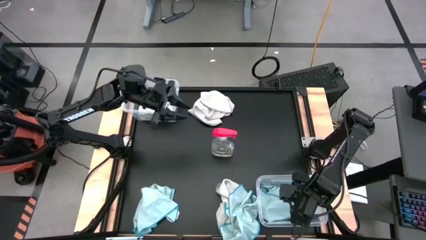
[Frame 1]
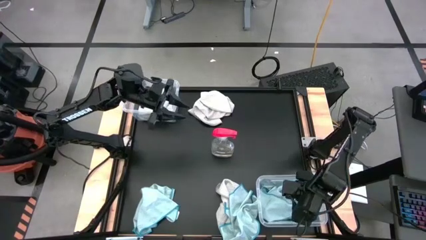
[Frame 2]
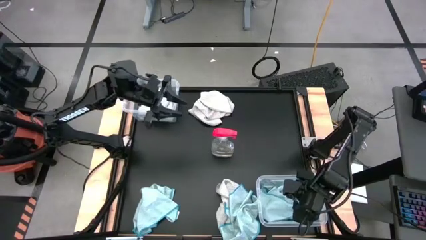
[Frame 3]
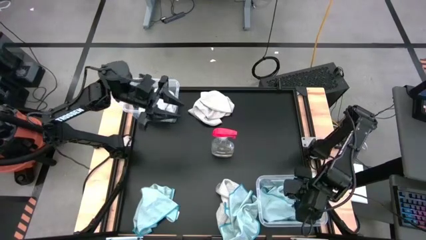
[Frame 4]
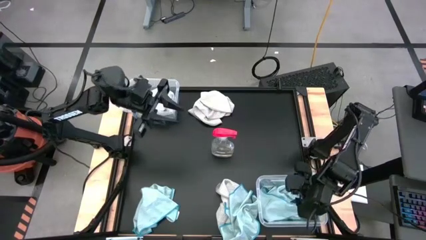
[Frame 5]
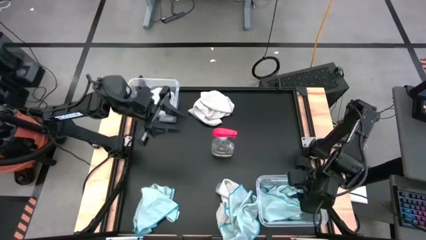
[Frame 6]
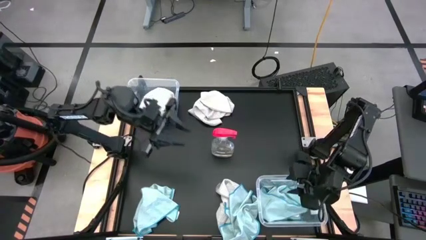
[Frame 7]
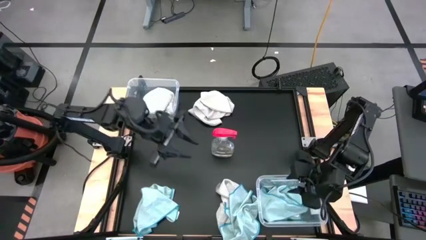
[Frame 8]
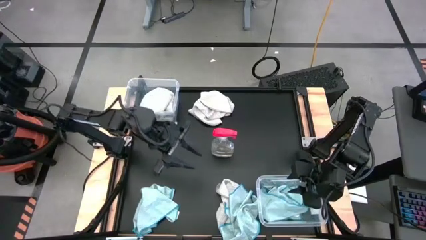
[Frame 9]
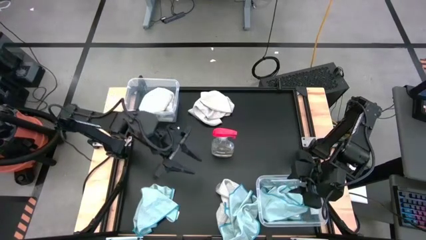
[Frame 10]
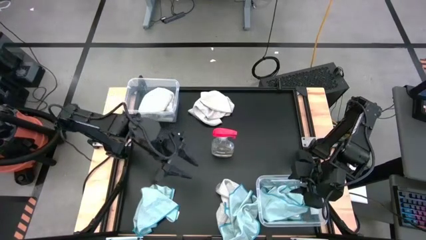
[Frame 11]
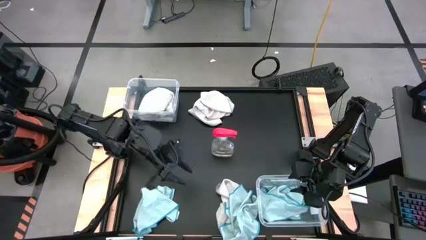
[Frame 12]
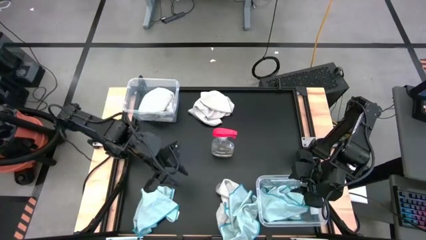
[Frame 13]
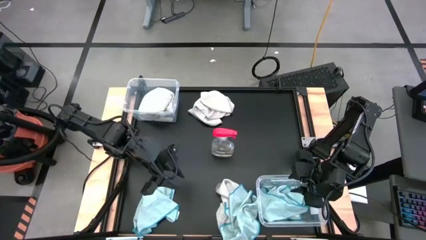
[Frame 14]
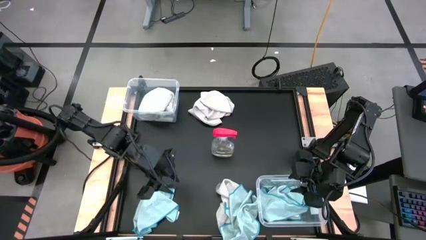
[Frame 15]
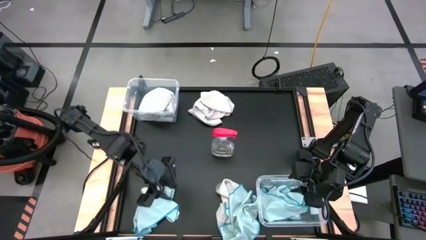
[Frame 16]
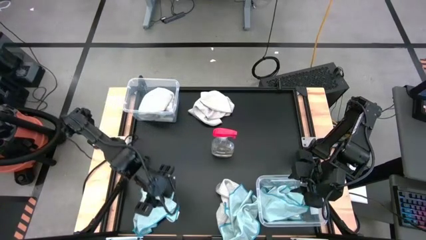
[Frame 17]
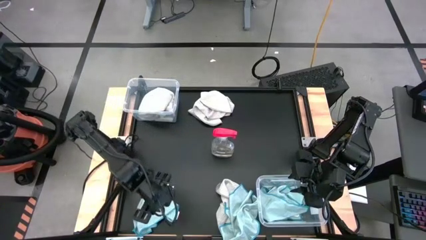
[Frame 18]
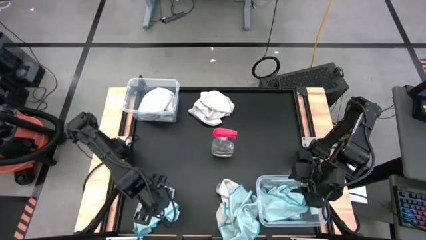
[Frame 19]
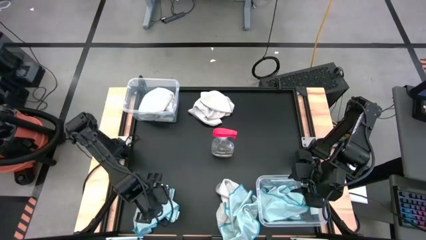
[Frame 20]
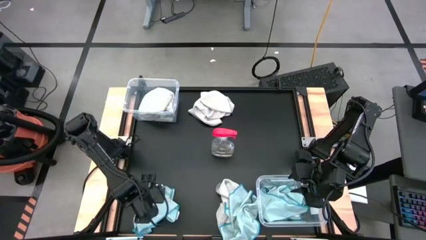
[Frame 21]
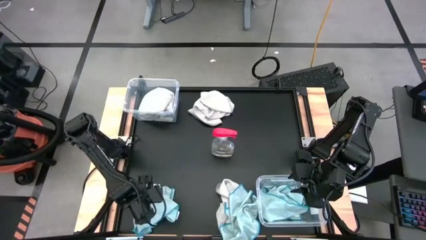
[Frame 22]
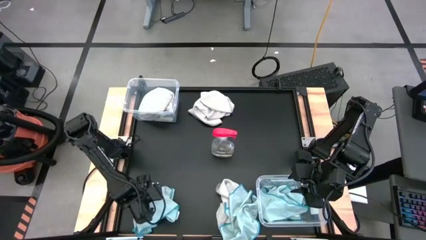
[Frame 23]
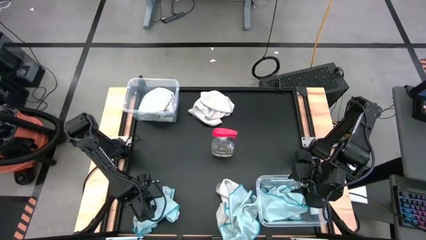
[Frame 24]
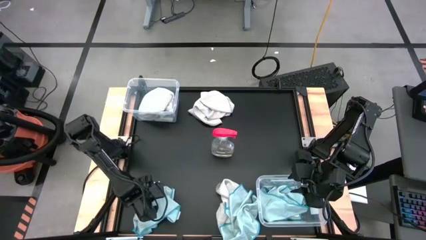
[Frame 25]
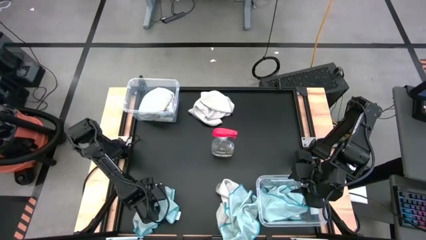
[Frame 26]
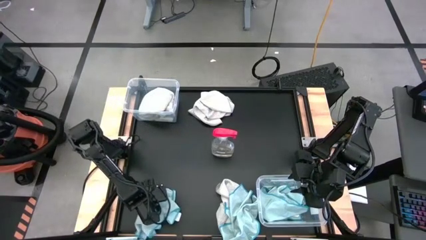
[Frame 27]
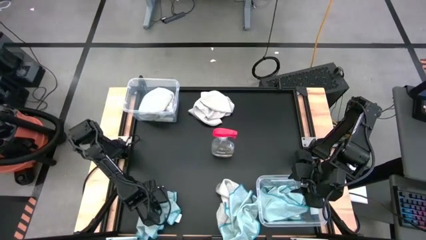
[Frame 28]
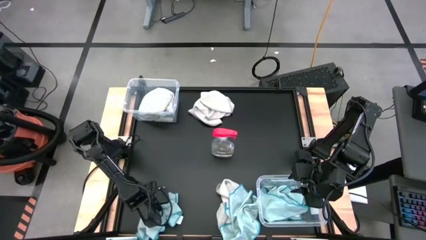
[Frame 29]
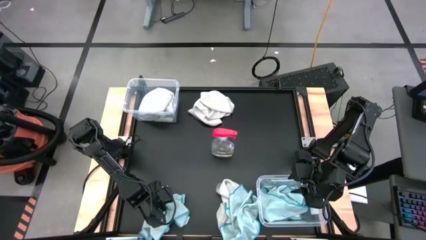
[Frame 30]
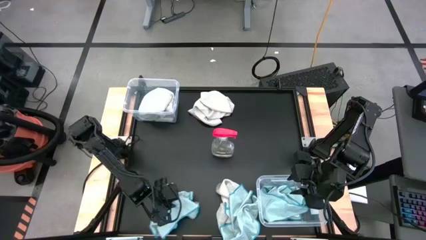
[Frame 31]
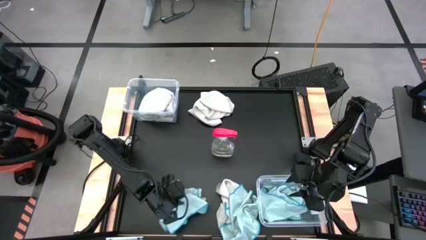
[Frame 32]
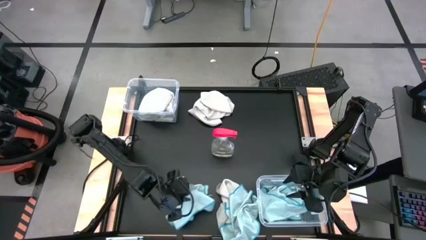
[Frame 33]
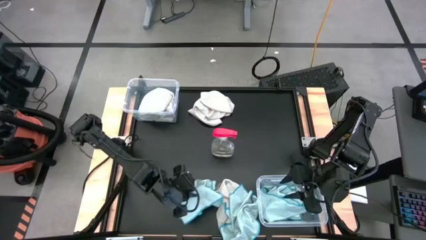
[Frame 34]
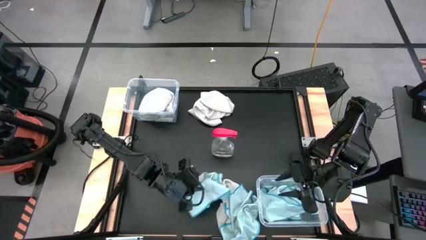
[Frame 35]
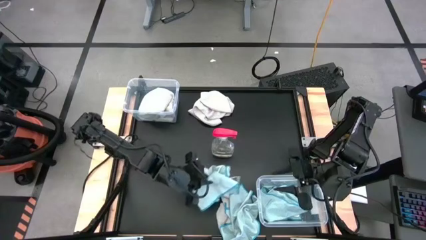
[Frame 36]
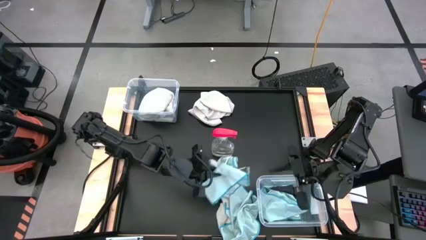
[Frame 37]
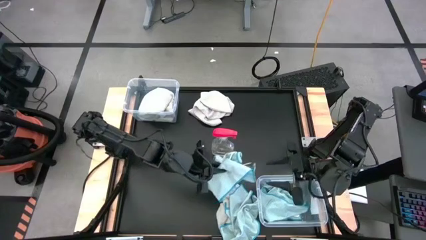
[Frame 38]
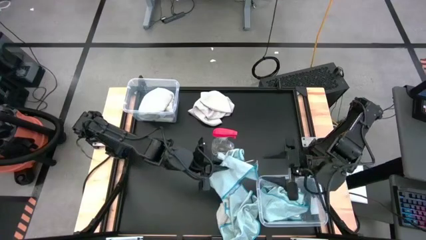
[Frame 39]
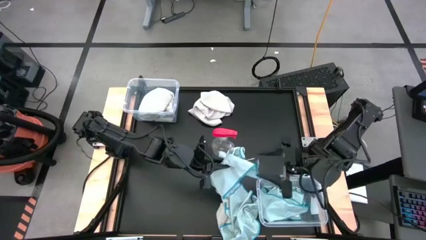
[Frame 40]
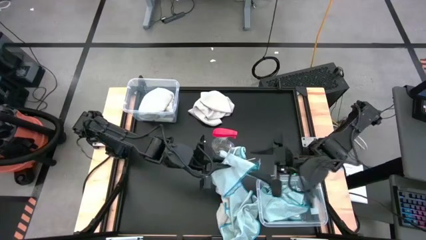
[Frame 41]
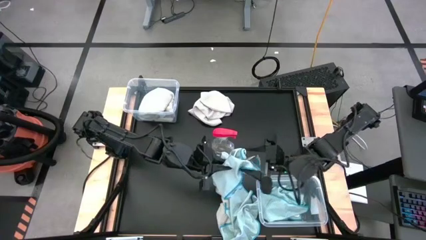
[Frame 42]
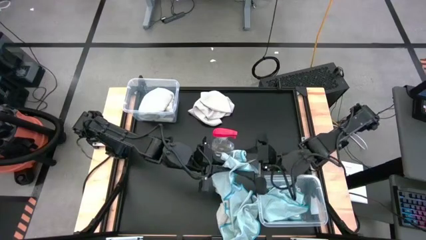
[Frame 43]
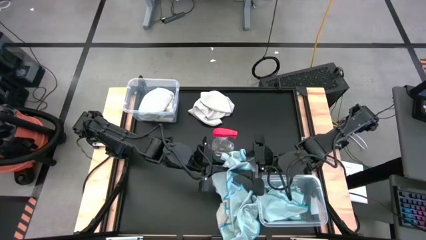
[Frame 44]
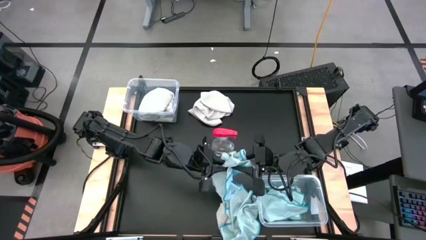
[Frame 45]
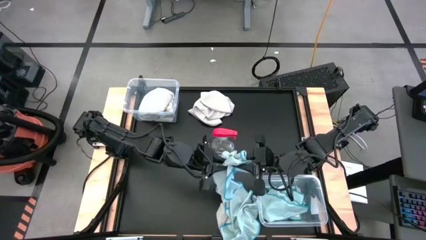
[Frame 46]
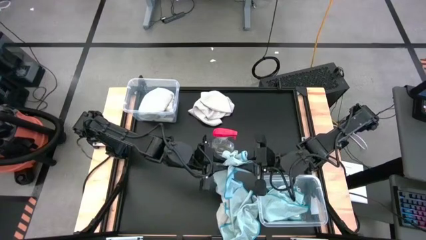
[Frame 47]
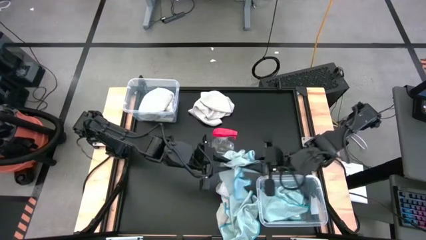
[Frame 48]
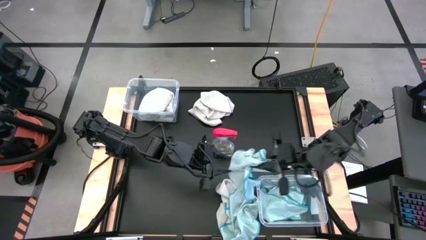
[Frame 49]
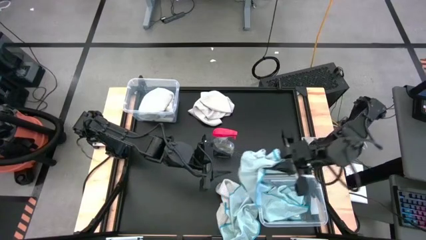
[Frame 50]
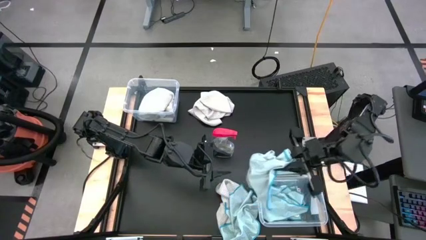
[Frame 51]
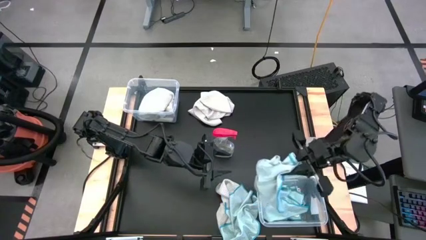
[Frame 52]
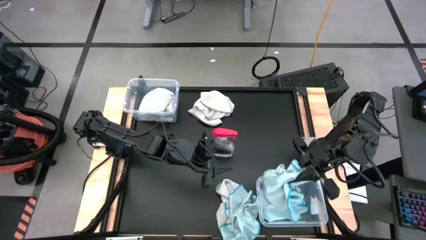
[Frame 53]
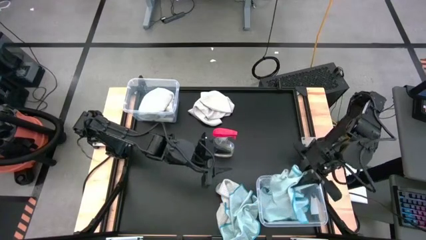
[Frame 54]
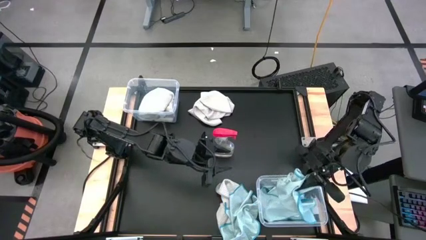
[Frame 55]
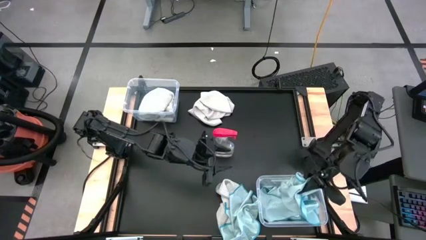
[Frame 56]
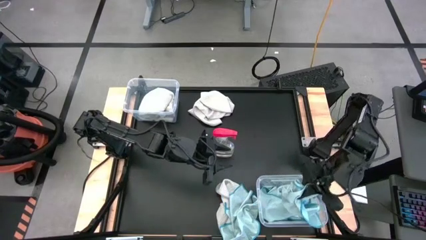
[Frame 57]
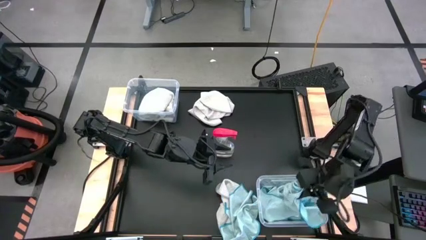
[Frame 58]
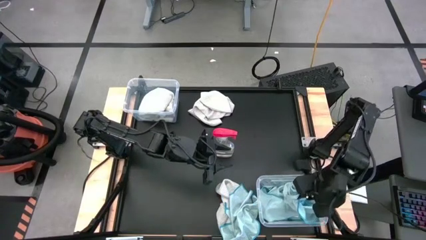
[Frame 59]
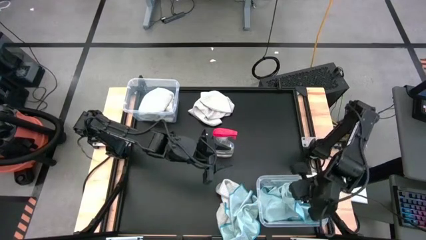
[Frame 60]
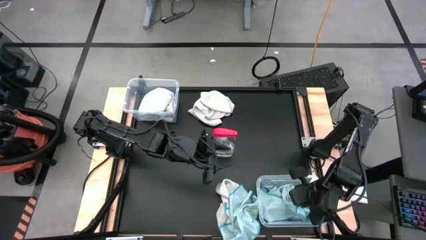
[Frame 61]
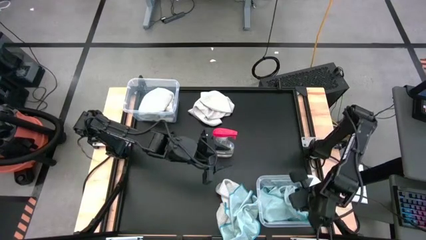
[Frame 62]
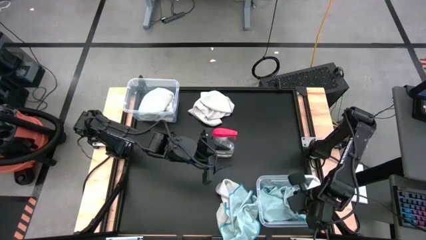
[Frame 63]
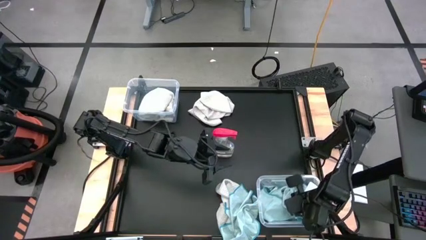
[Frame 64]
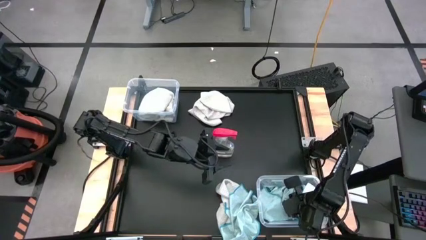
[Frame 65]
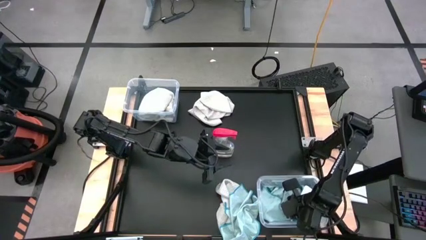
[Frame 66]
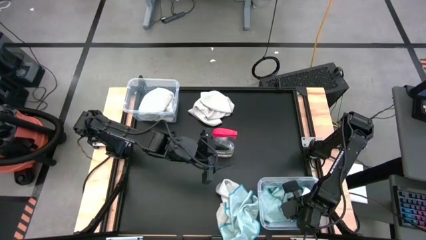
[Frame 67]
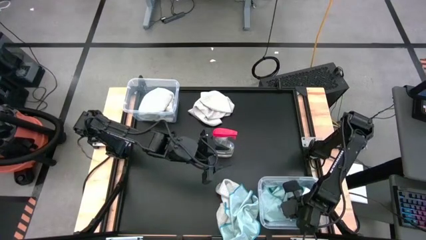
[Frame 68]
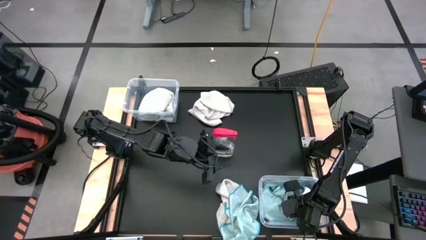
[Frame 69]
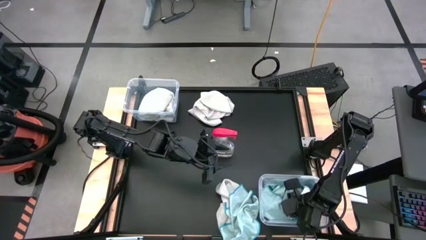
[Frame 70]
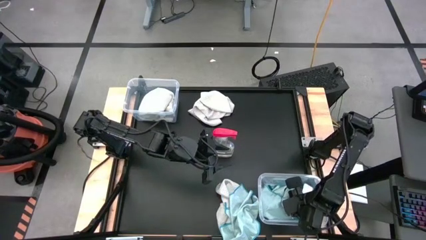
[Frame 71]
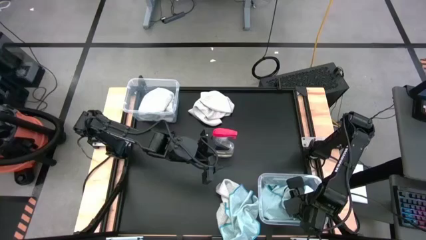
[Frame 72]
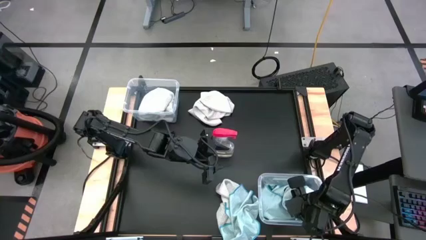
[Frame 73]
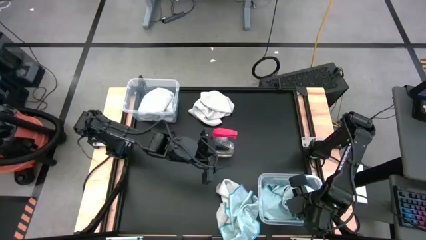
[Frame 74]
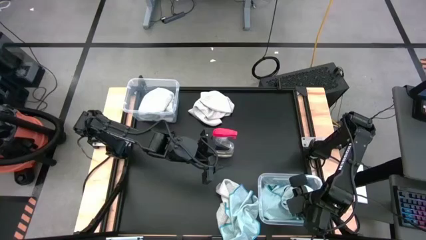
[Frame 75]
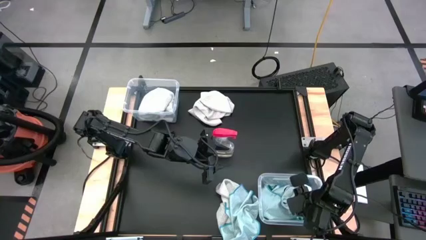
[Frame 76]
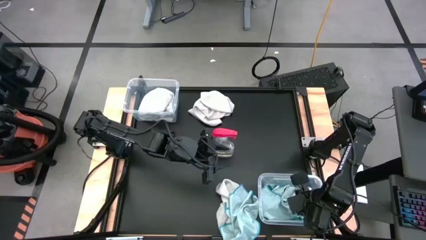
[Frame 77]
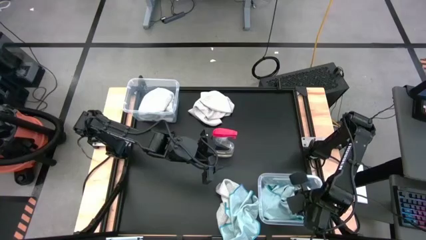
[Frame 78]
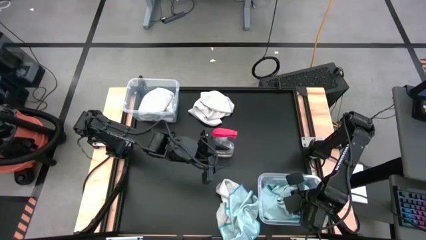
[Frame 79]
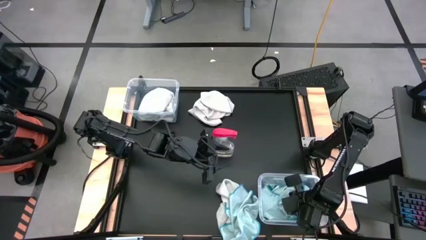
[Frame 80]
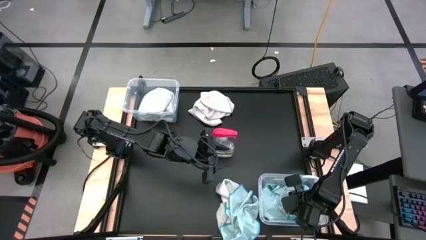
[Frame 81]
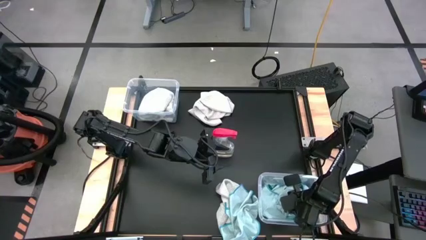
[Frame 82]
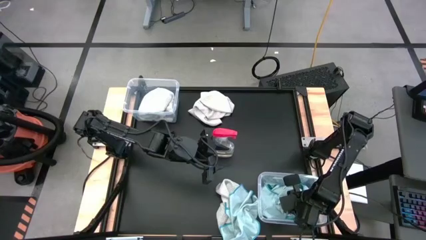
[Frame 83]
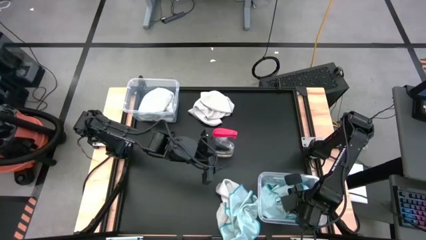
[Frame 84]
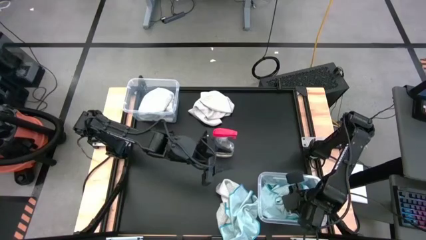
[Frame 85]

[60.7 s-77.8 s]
Task: Sort microfiber towel by color & place in baskets
Put the blue towel into the bottom transparent bin
